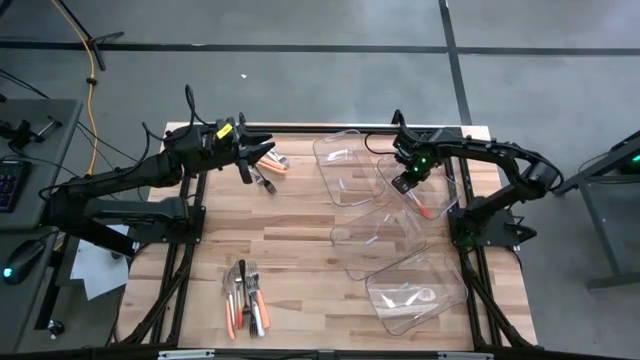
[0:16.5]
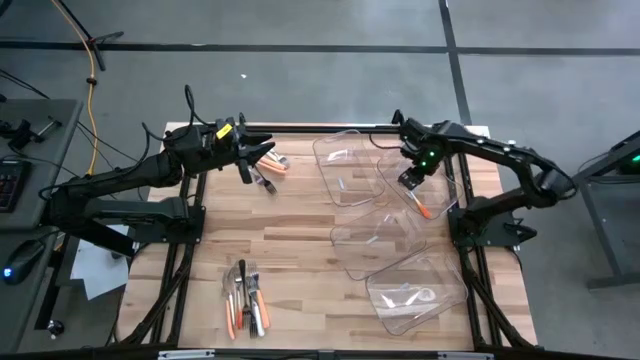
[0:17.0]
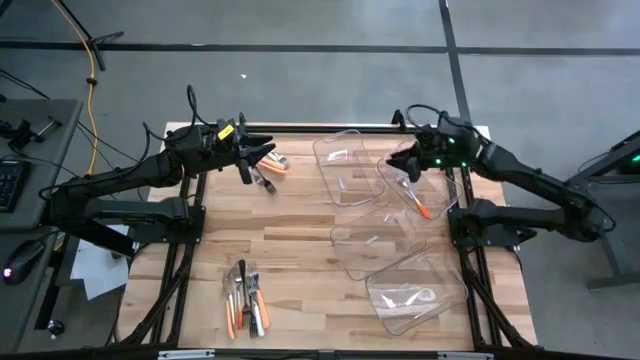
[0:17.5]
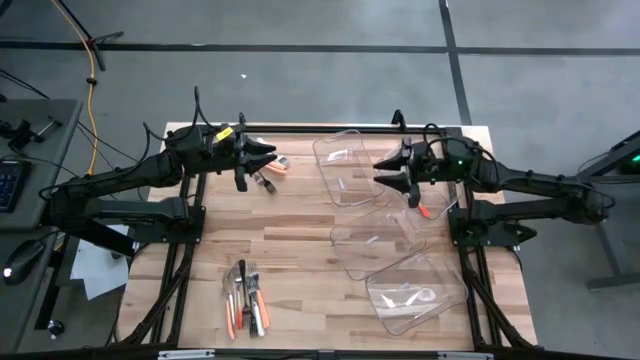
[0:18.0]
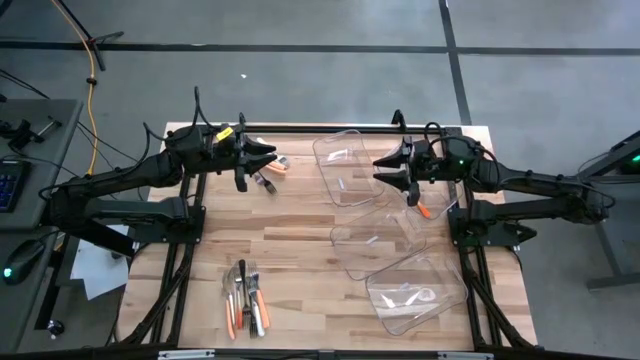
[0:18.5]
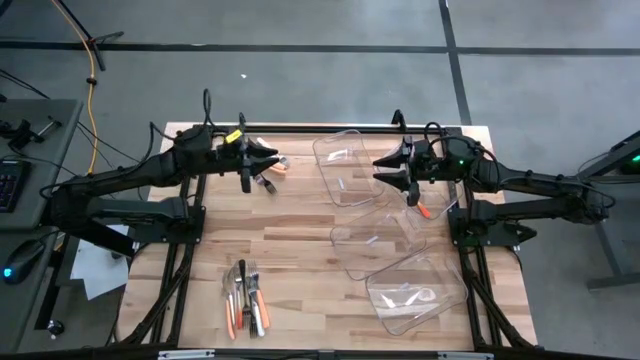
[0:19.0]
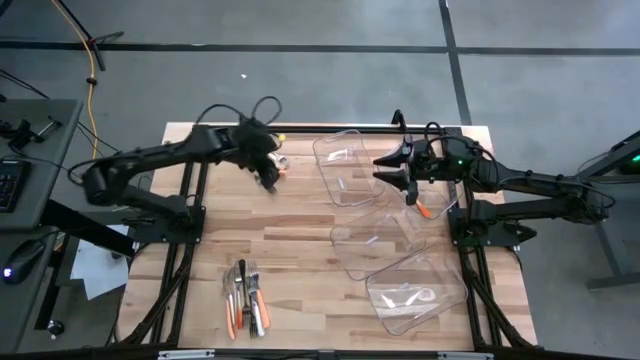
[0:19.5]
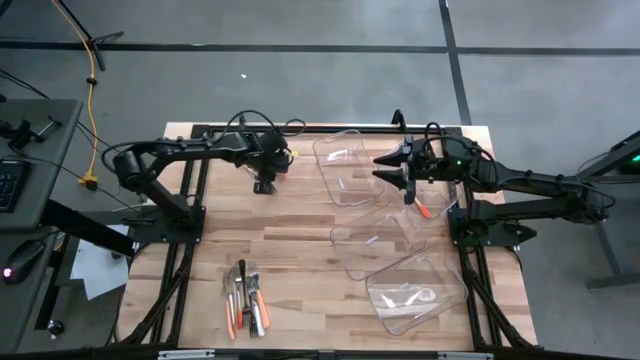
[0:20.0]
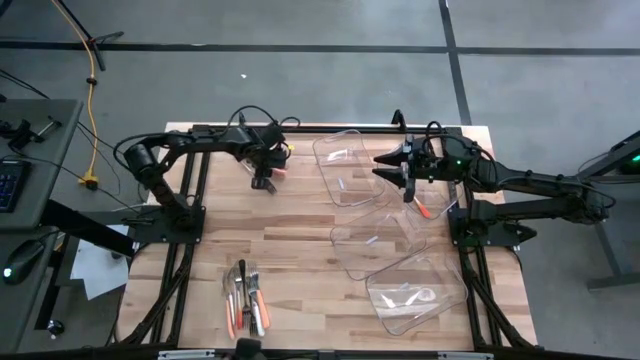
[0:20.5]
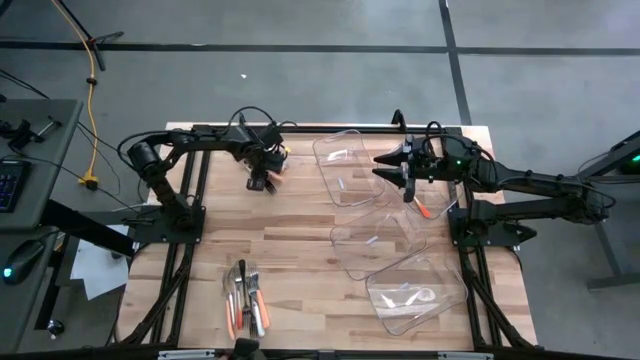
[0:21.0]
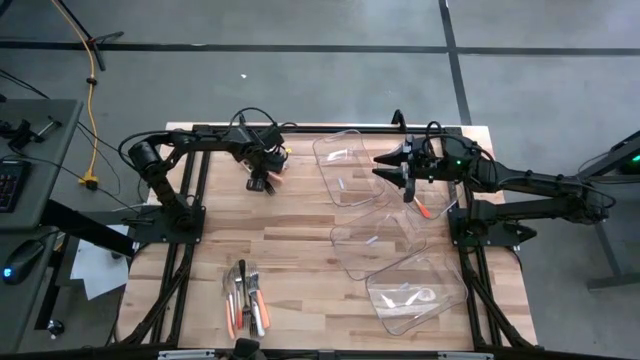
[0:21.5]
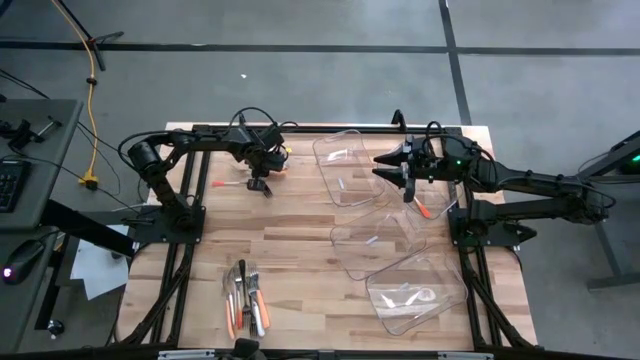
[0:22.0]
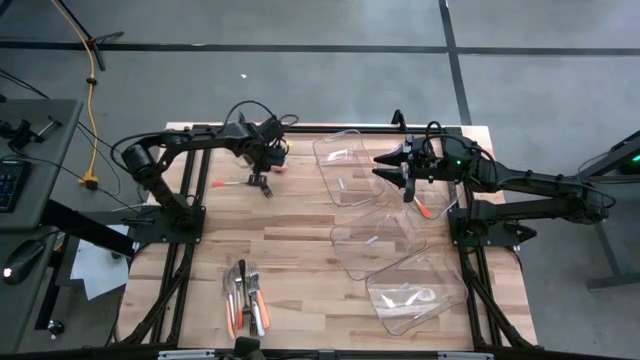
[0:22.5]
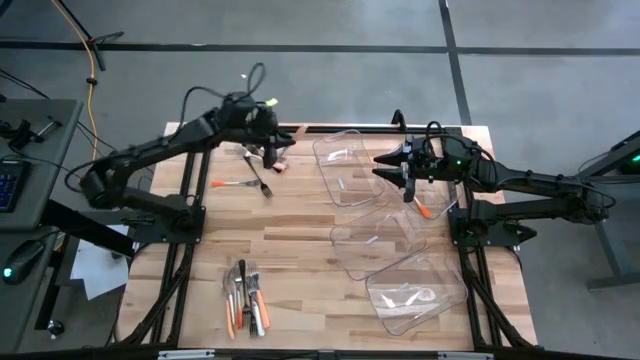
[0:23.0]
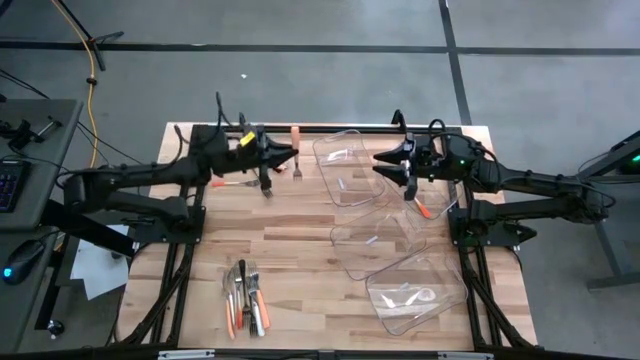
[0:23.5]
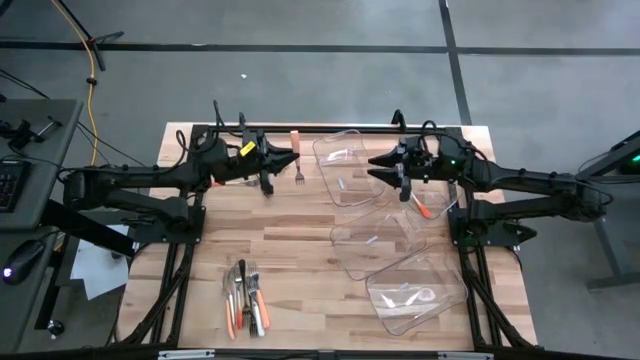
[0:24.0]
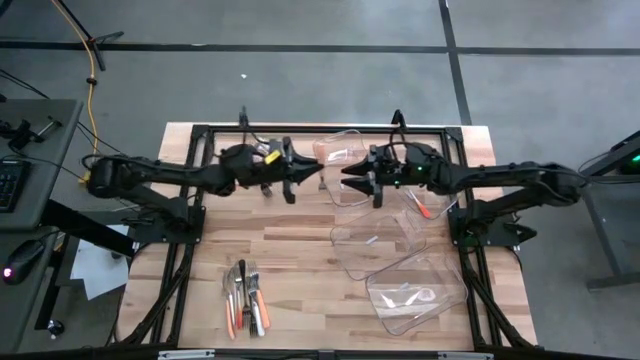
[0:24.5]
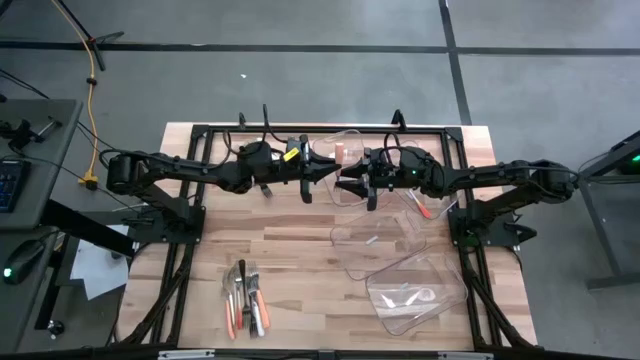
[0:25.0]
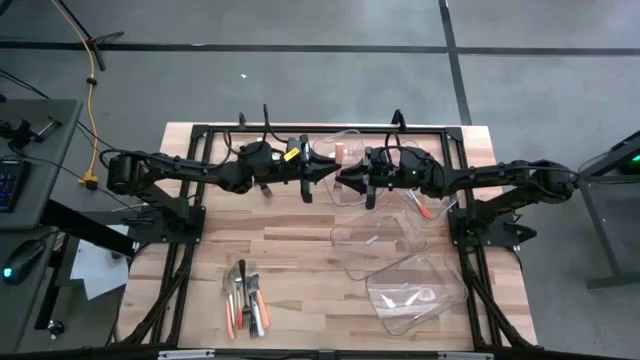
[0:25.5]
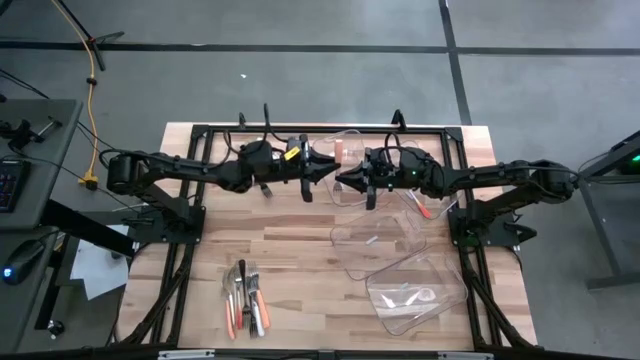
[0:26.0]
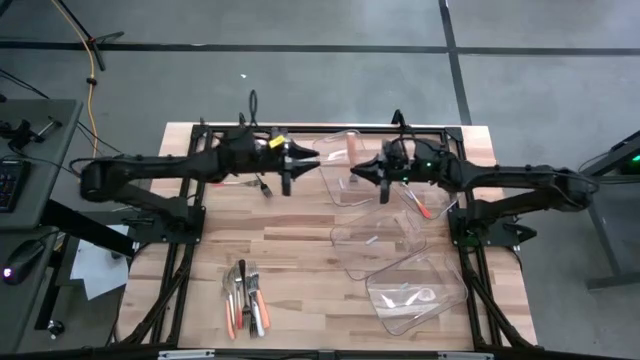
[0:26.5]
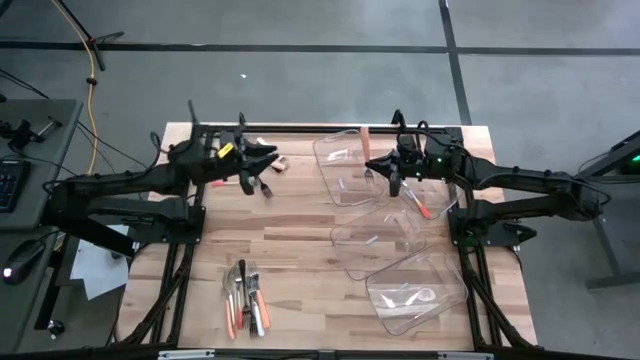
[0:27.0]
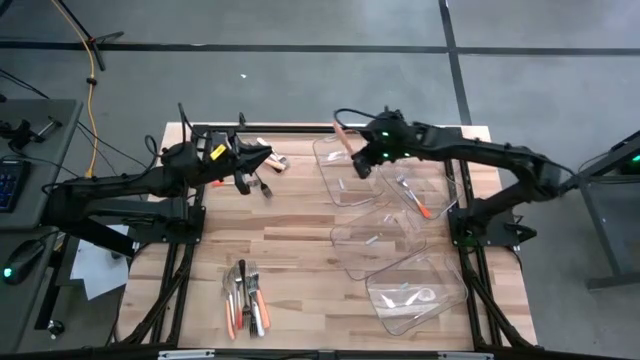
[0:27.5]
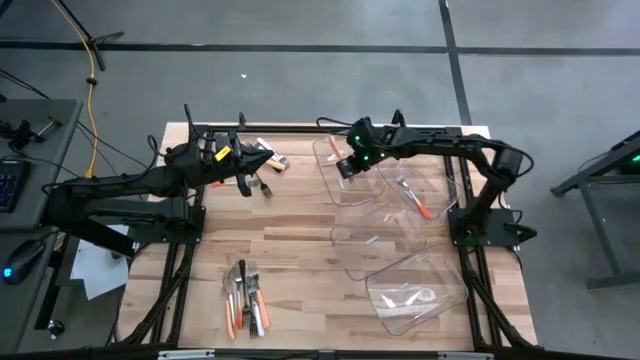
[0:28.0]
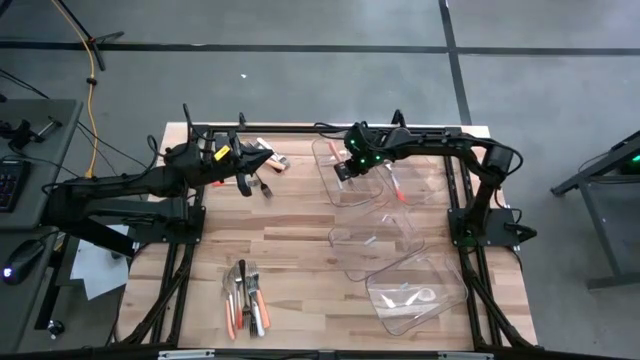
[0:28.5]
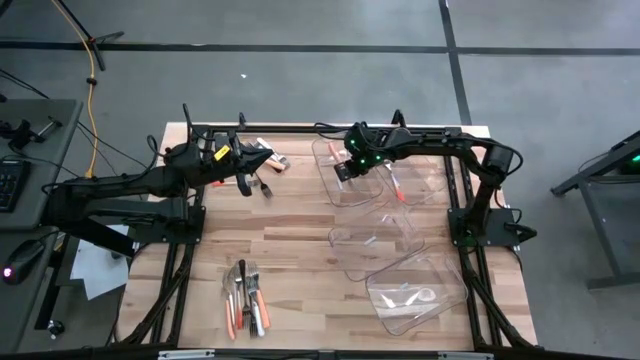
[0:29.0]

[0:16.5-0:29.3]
Task: Sort silverware by color (type)
Put the light orange fork into the left transparent bin

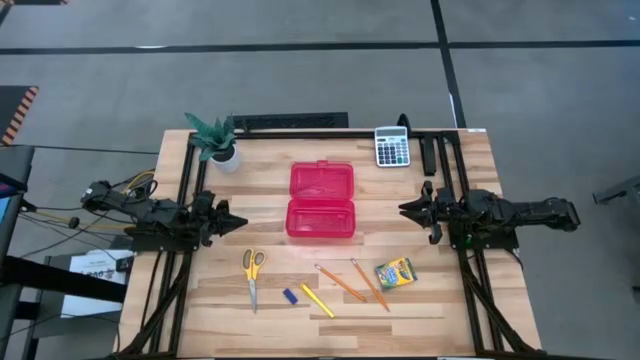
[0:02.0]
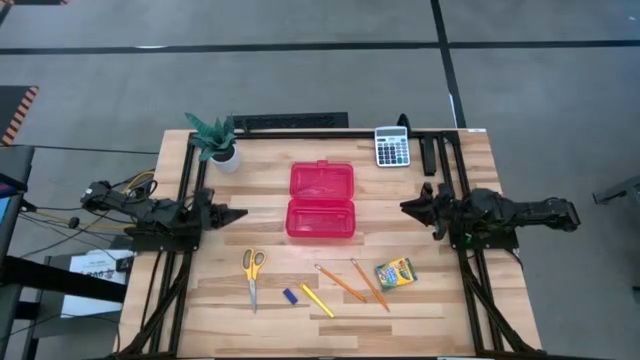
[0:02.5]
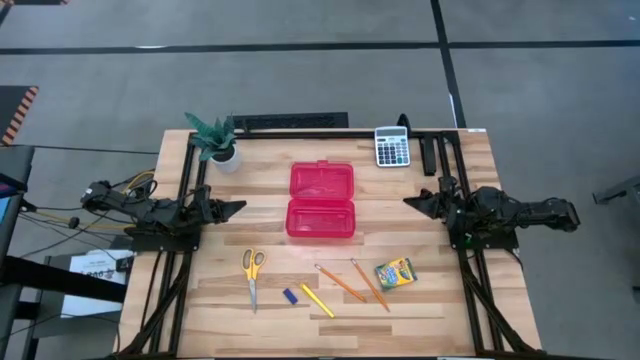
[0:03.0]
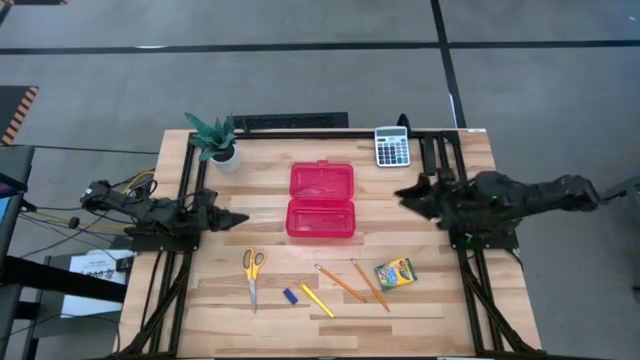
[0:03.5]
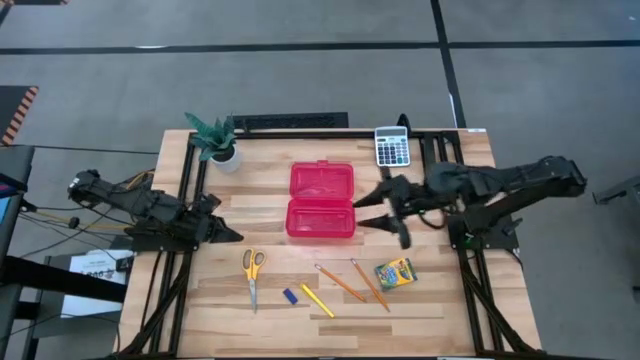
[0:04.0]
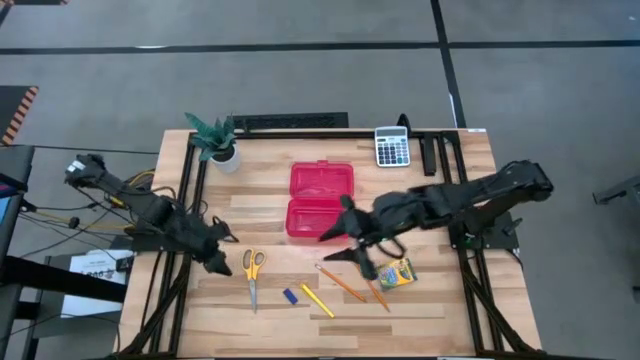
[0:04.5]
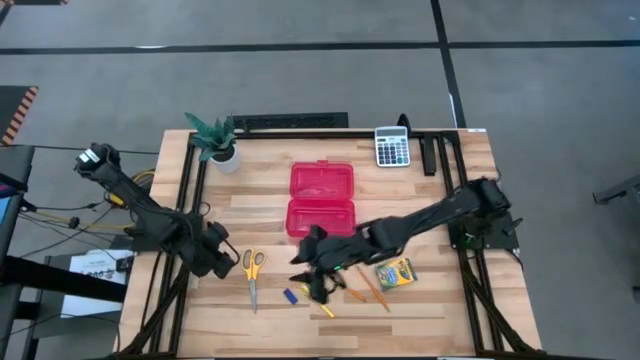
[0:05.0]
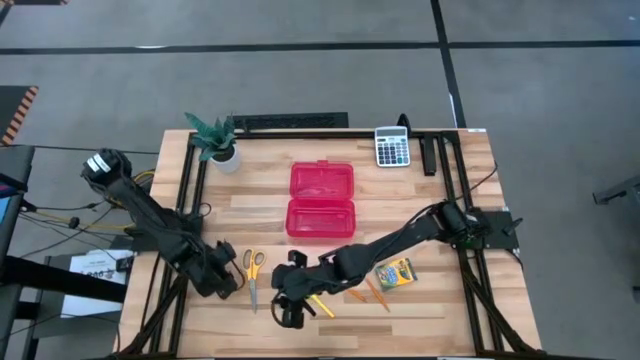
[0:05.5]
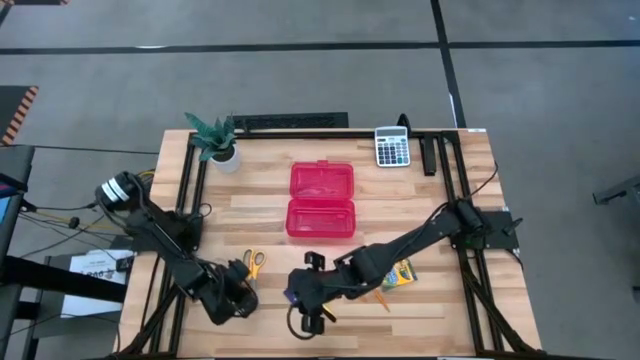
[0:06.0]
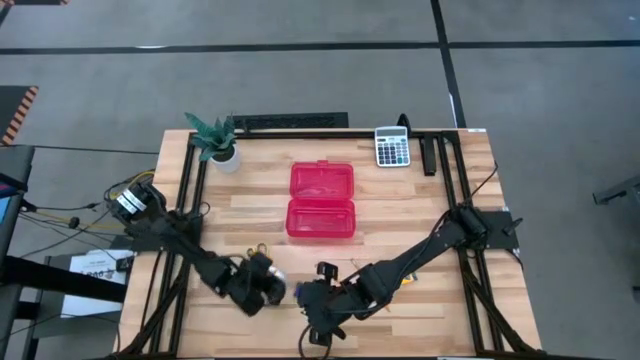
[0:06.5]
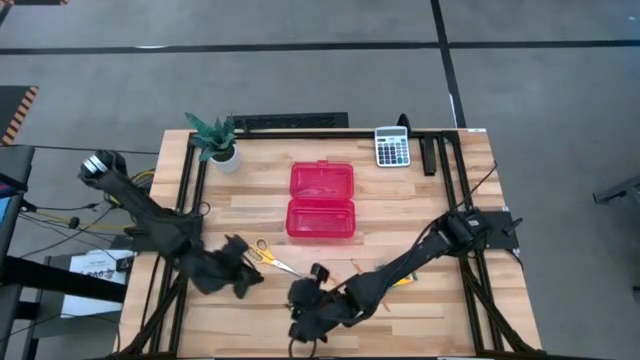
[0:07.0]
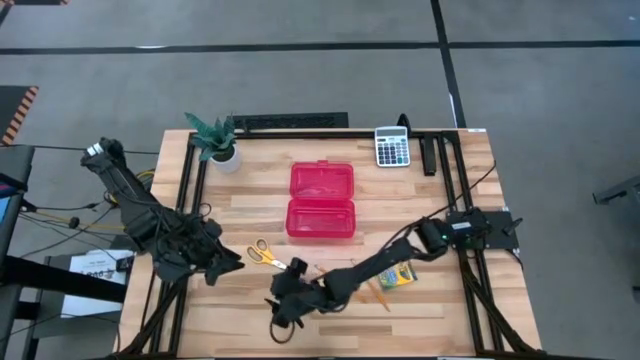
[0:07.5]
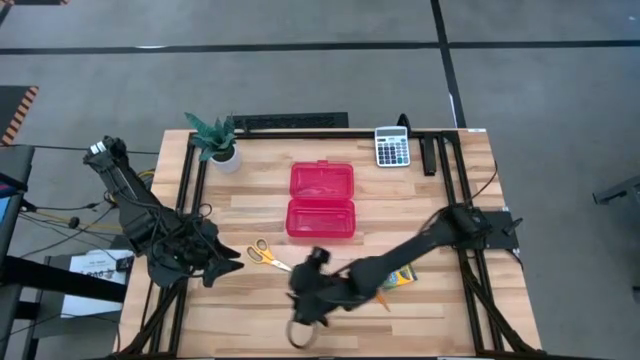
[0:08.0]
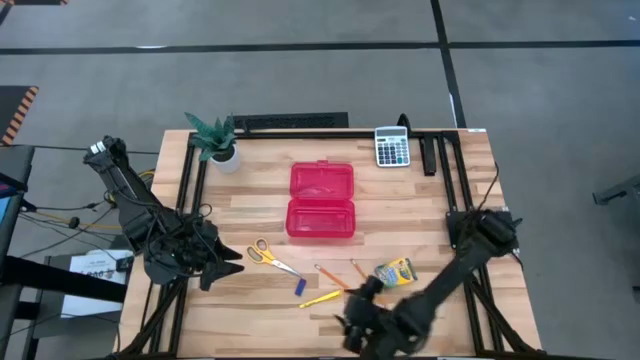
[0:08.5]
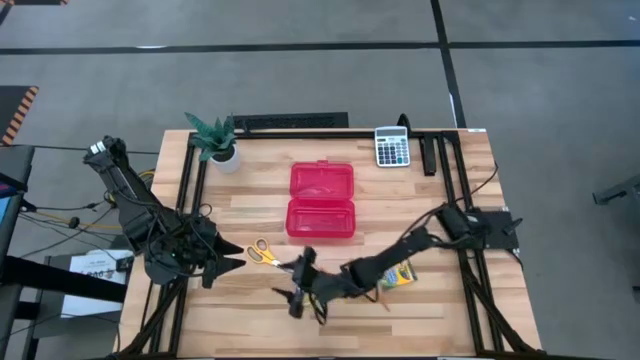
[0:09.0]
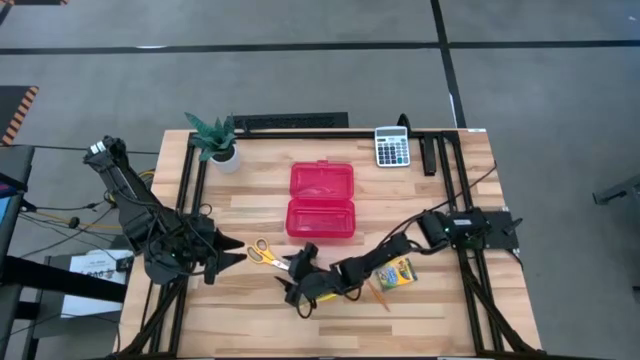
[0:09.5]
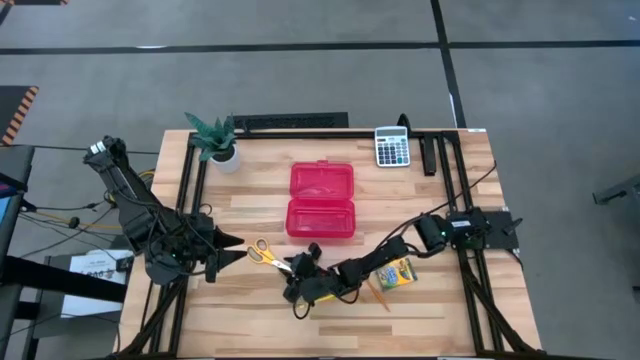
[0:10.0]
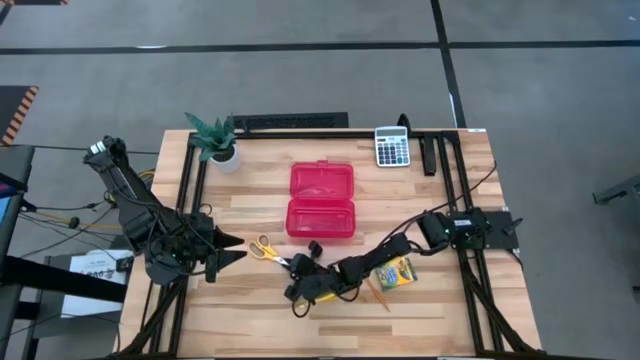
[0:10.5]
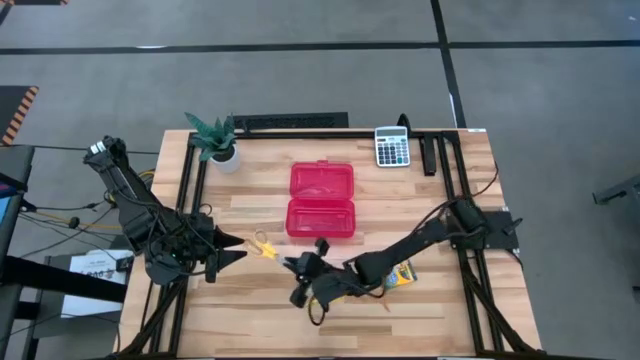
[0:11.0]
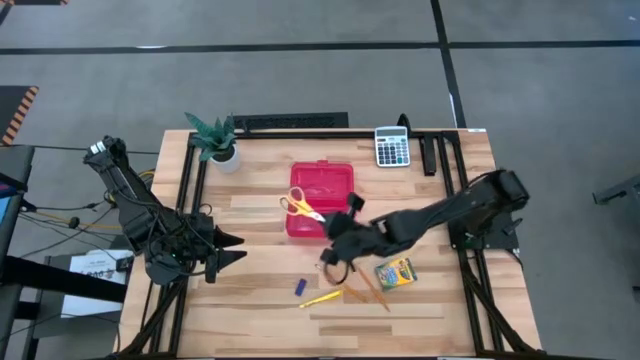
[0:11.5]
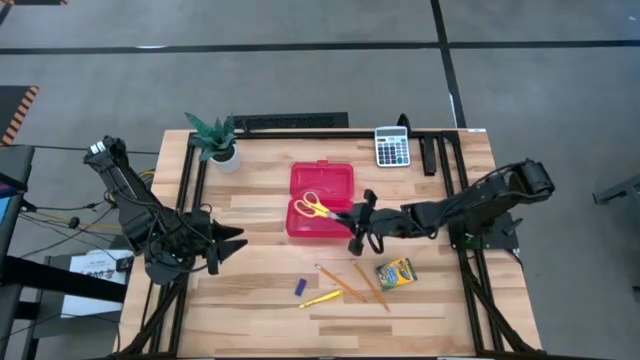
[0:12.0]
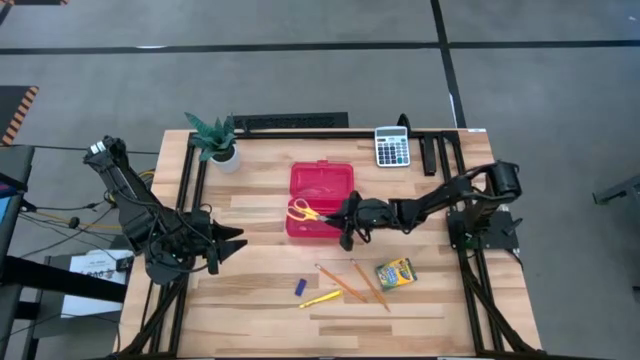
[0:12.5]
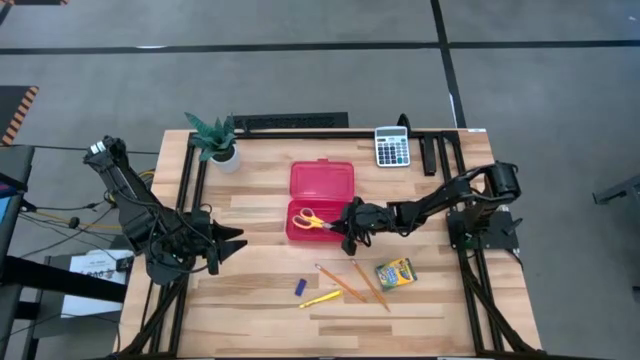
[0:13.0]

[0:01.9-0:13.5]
Task: Pack school essentials
Put the scissors into the supply box
